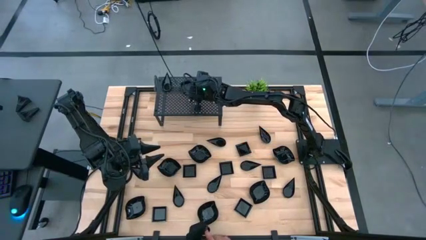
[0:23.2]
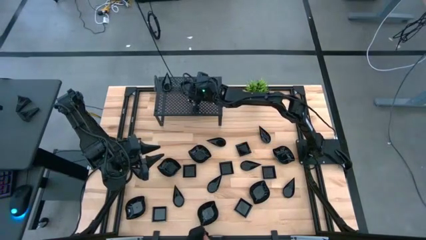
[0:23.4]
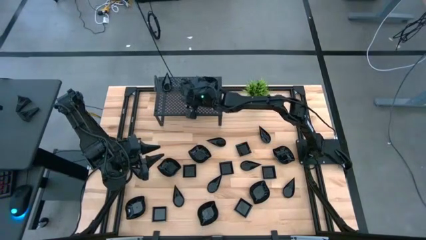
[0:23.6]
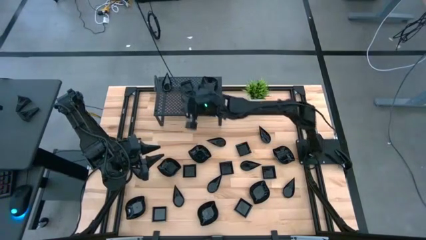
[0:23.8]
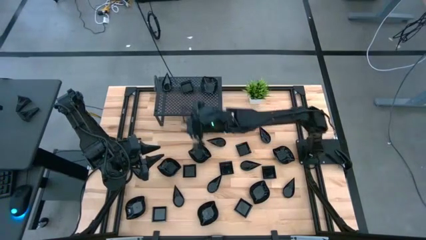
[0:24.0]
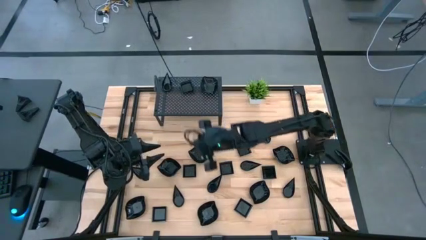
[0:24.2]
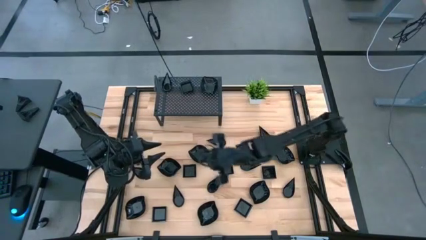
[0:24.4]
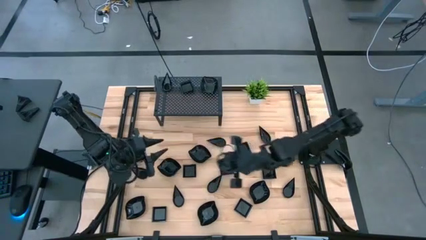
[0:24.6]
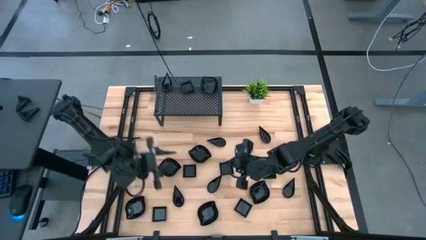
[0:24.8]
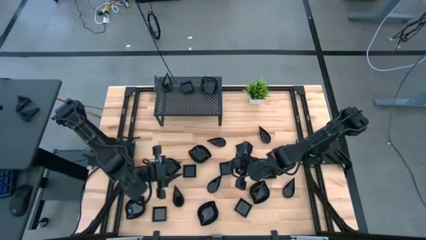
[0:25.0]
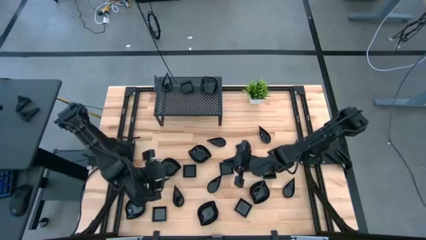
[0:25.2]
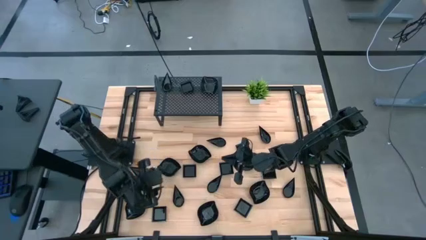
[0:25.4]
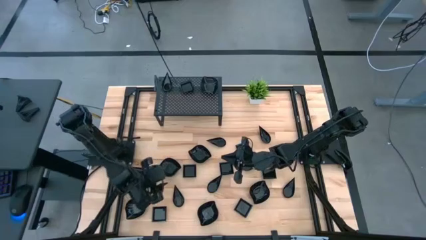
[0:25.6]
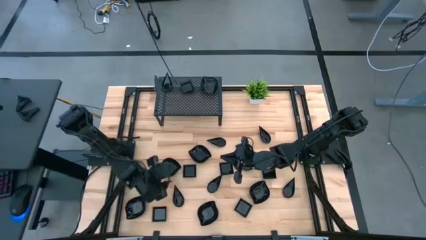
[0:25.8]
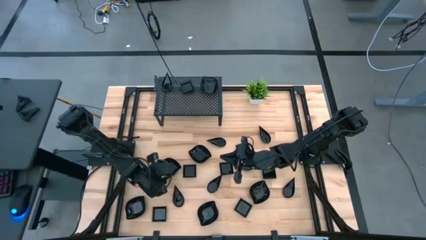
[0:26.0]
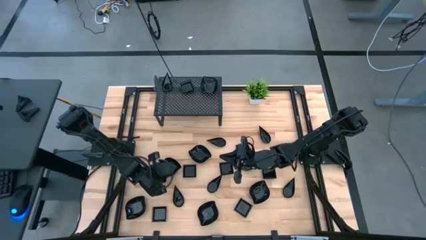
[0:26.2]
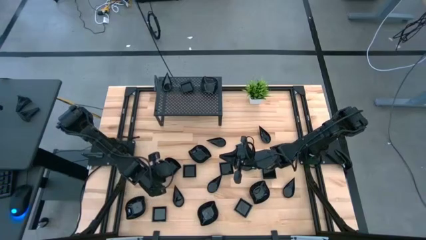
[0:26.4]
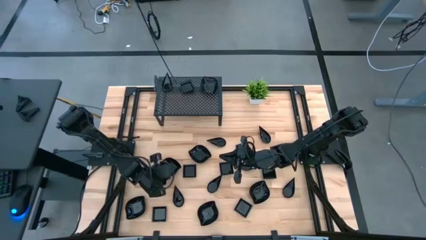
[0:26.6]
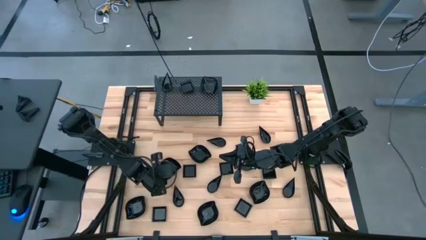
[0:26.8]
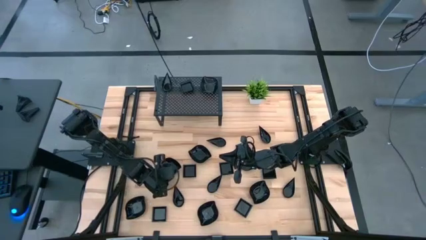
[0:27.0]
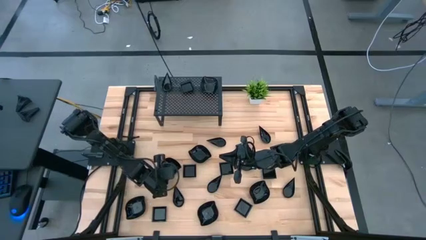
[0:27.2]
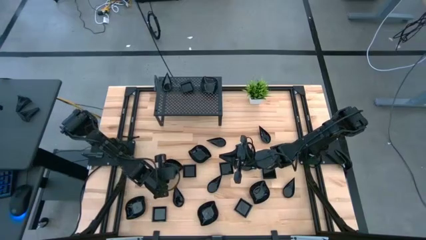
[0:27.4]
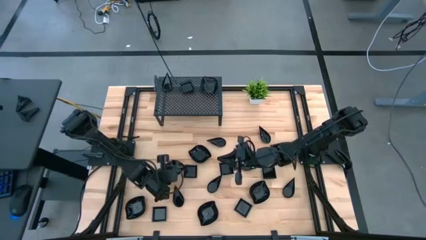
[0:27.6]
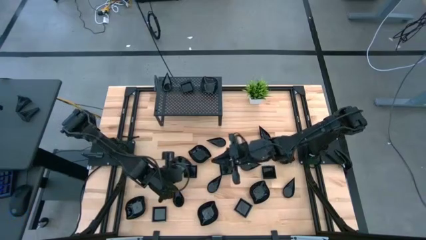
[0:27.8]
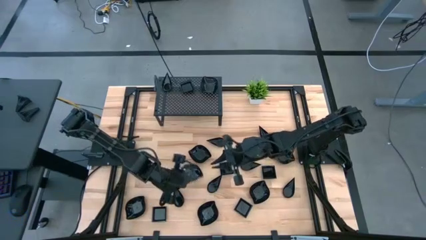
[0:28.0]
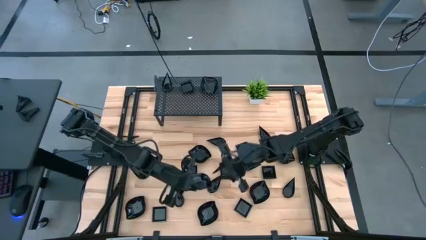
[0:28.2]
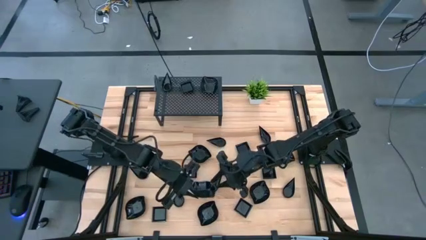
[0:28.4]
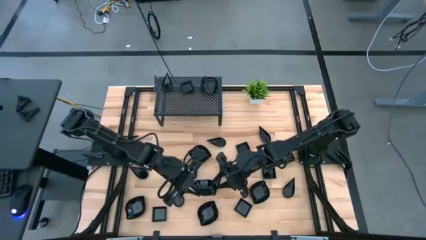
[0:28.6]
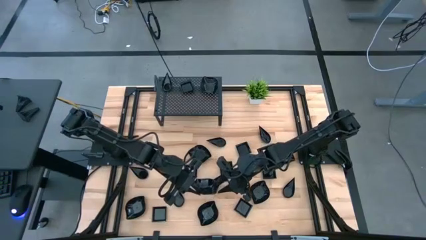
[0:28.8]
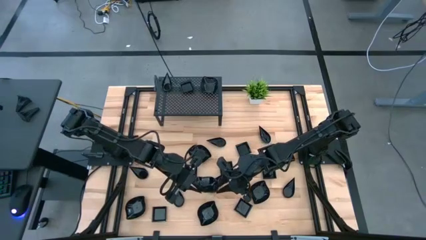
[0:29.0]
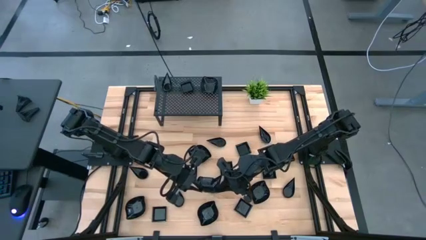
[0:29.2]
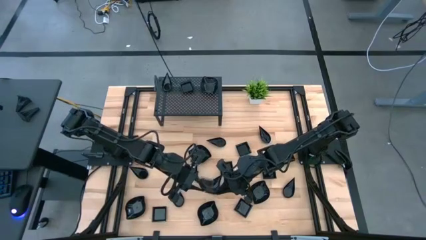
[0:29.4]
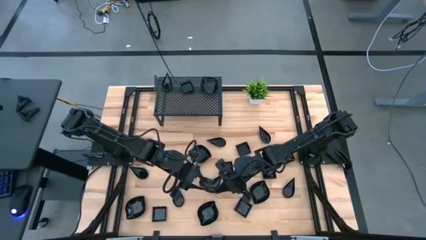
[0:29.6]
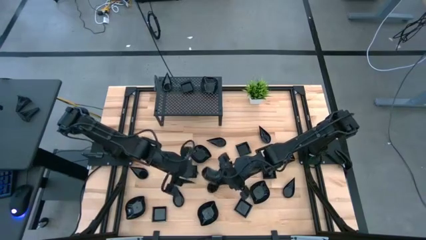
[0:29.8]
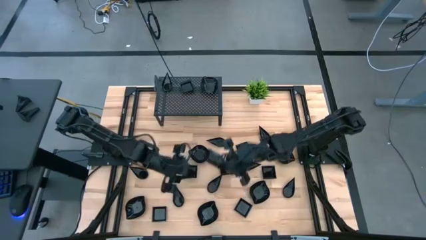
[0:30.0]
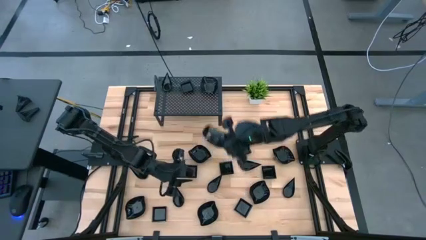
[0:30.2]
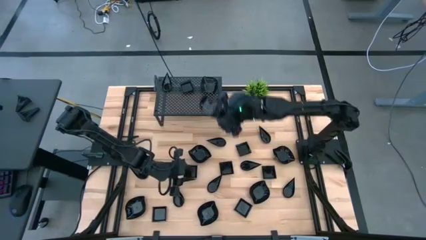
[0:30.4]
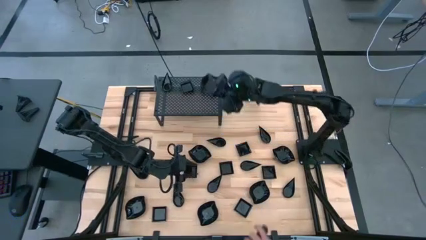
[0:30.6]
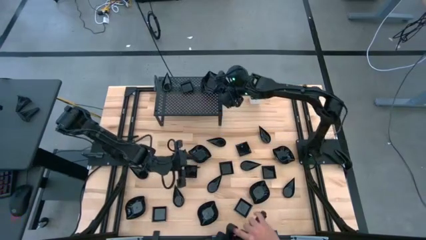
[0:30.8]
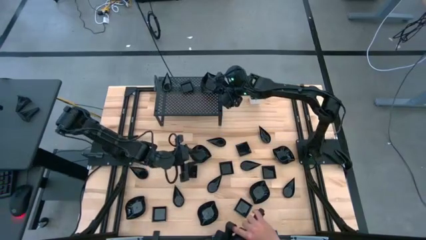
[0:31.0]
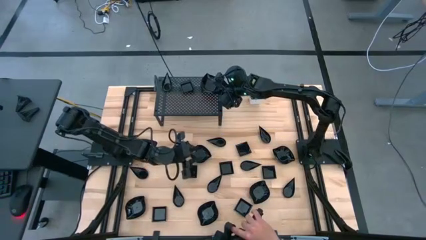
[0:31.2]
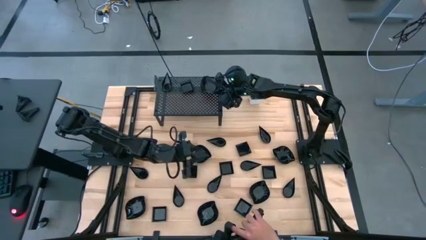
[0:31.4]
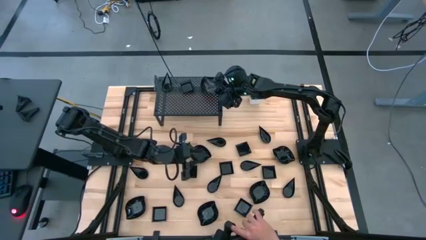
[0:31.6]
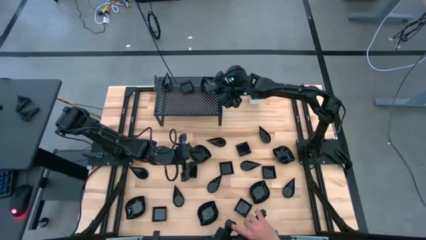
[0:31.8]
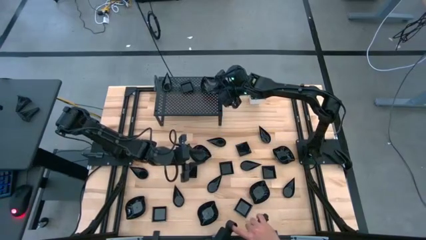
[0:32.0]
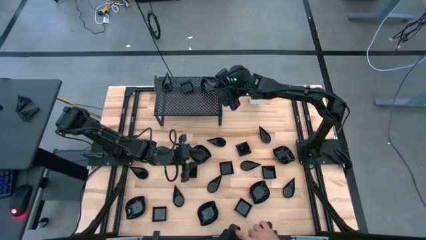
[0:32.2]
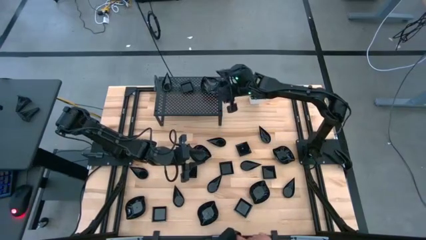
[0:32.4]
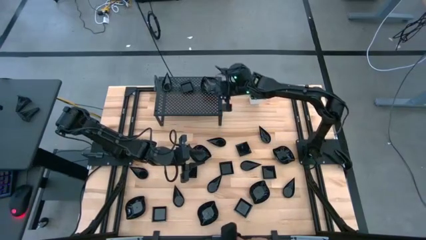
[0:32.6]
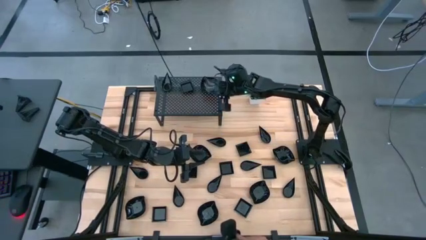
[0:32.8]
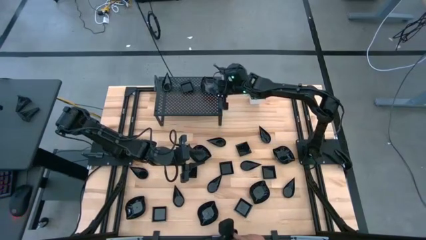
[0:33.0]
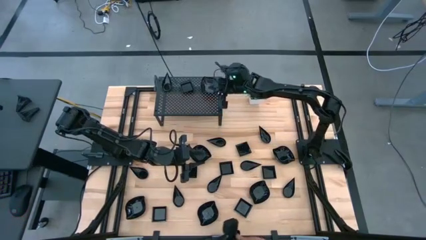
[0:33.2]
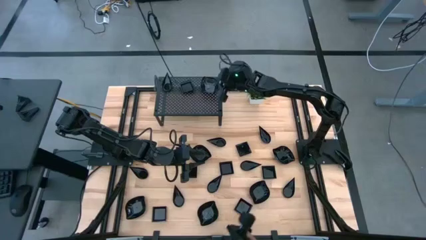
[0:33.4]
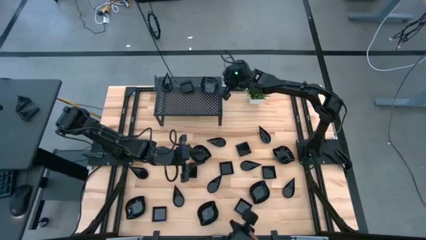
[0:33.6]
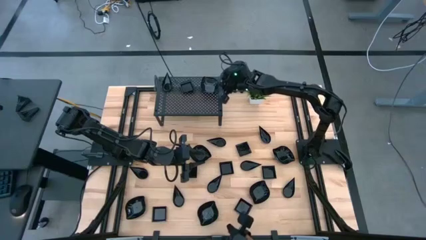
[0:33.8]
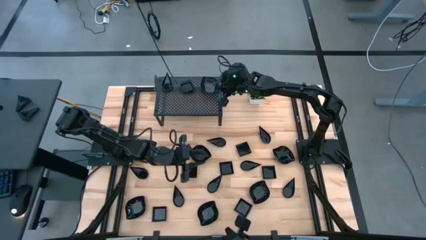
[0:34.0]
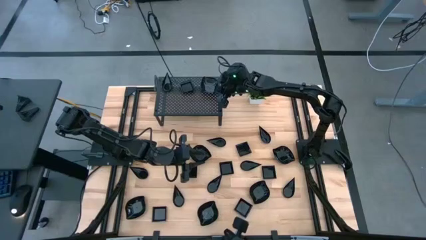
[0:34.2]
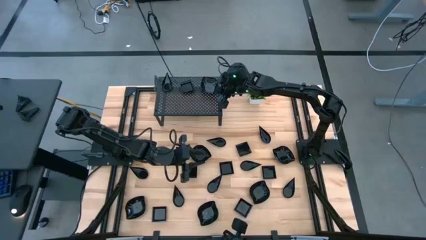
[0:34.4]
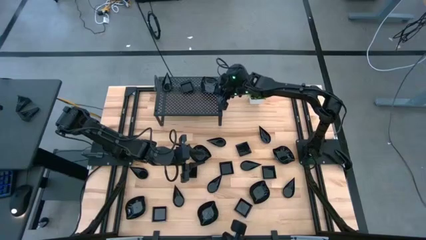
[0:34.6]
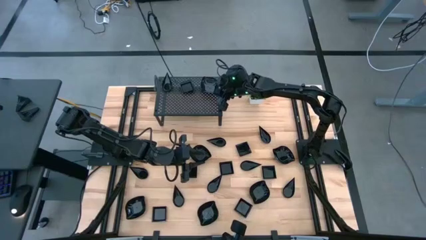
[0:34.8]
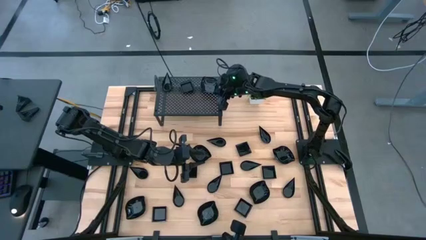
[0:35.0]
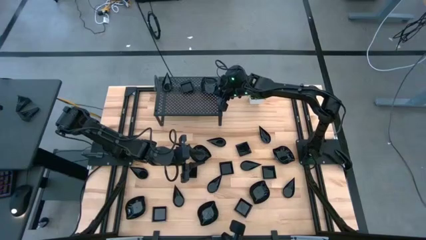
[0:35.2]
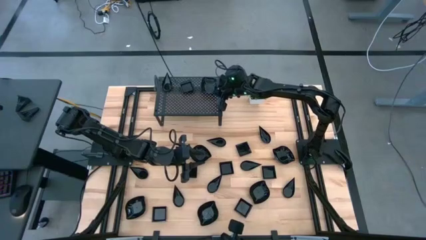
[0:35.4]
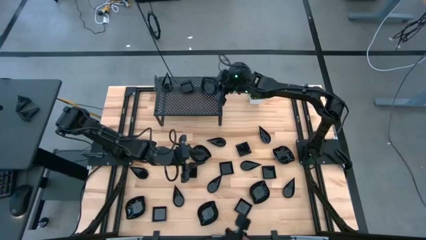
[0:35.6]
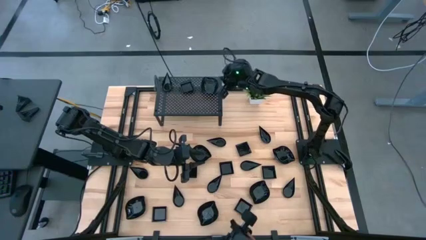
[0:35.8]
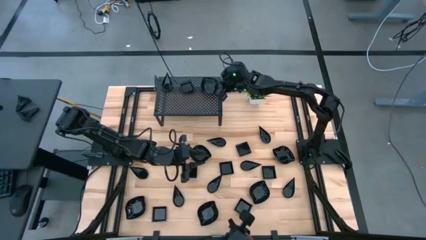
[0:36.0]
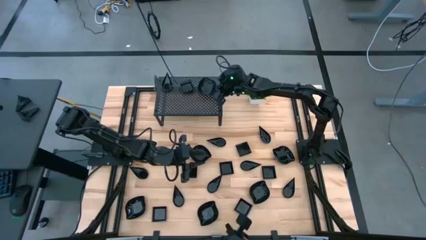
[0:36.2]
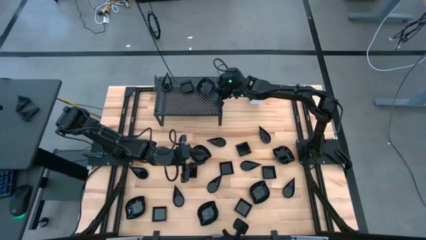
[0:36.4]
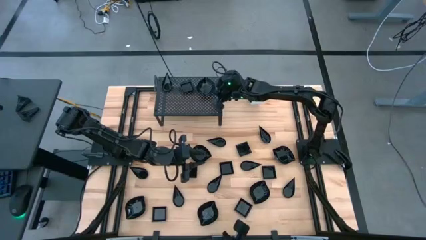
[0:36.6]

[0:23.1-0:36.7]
Task: Pick & Place Mini shaped plates
Stack the black leaf-shaped plate on top of the leaf-shaped plate on the shelf

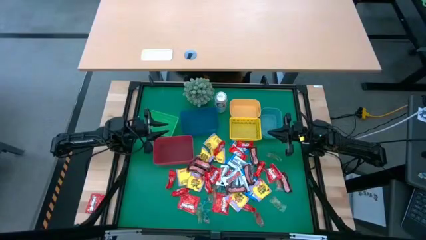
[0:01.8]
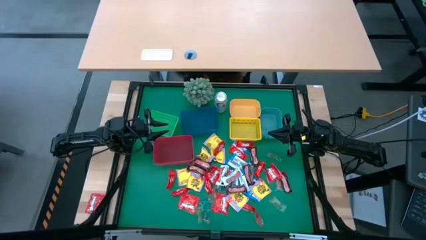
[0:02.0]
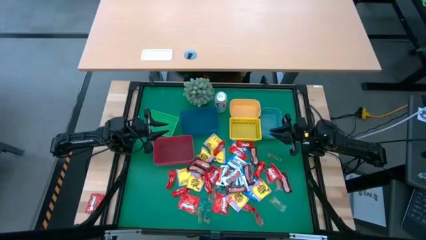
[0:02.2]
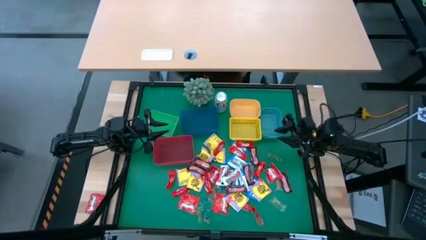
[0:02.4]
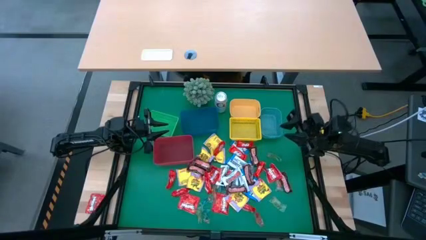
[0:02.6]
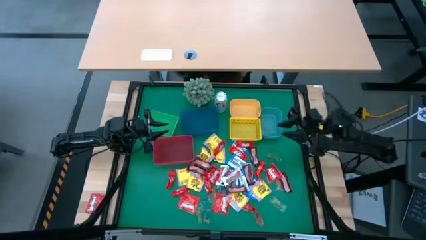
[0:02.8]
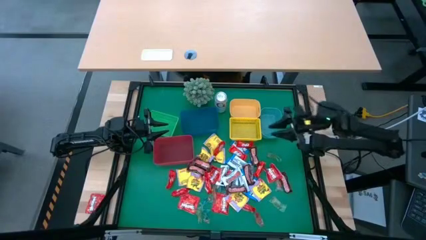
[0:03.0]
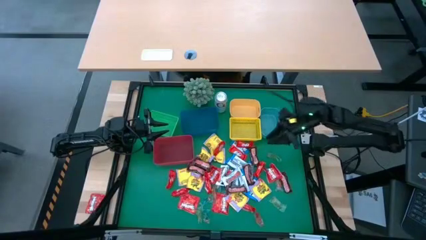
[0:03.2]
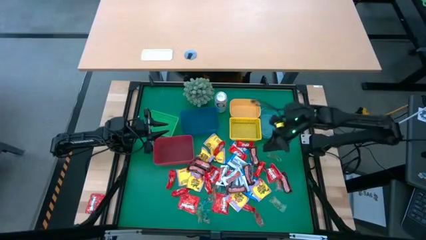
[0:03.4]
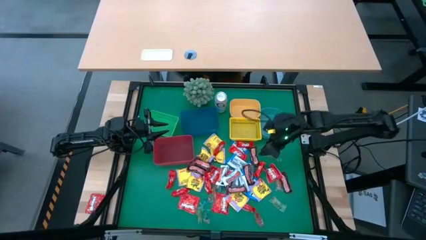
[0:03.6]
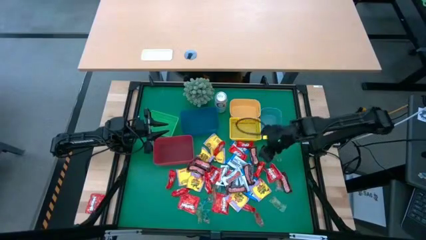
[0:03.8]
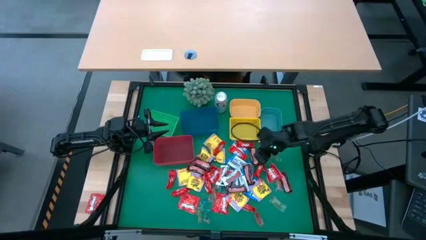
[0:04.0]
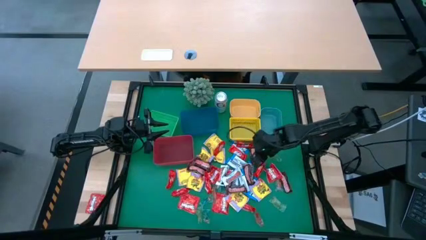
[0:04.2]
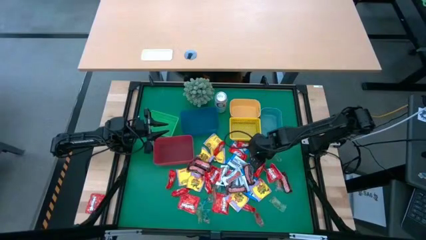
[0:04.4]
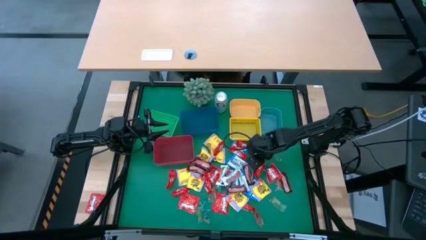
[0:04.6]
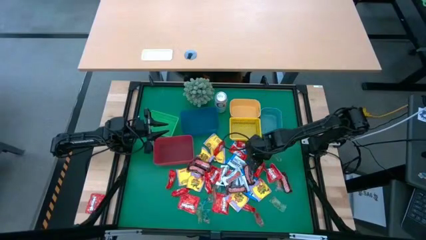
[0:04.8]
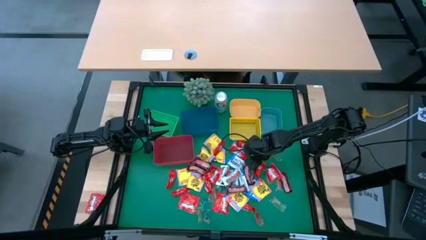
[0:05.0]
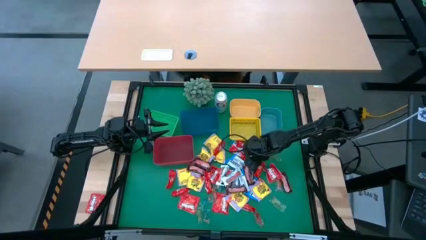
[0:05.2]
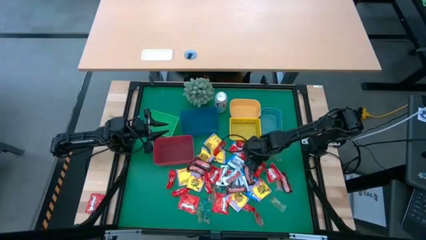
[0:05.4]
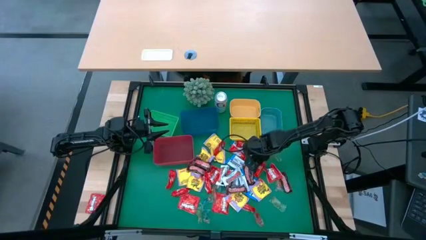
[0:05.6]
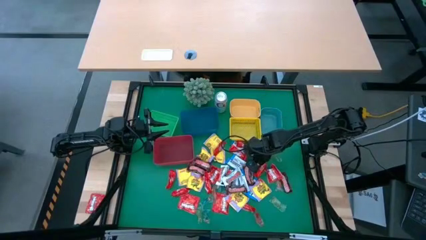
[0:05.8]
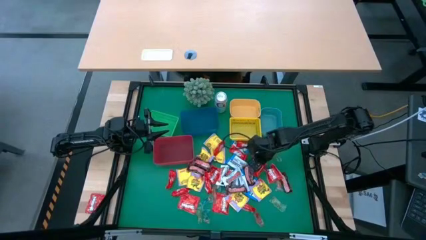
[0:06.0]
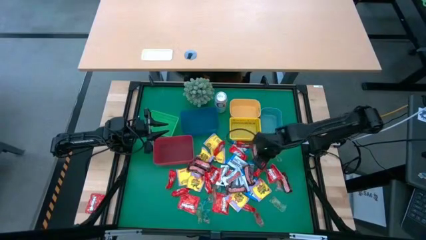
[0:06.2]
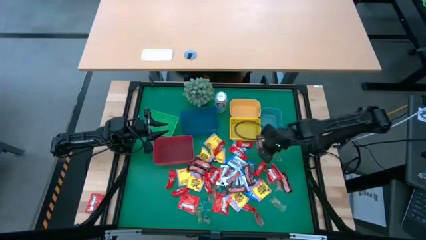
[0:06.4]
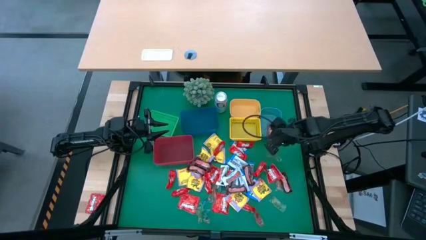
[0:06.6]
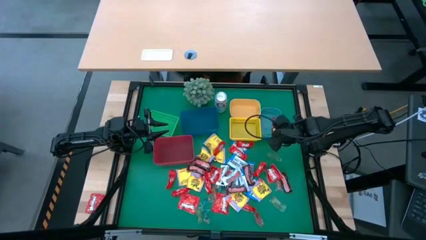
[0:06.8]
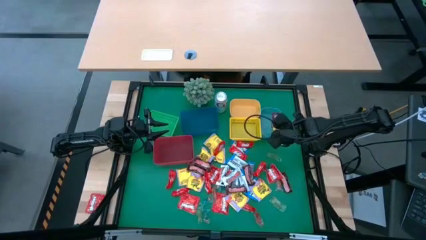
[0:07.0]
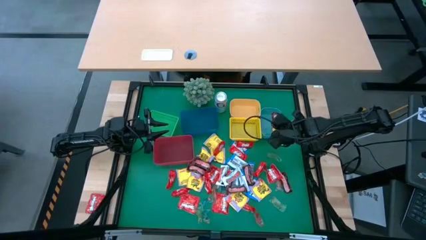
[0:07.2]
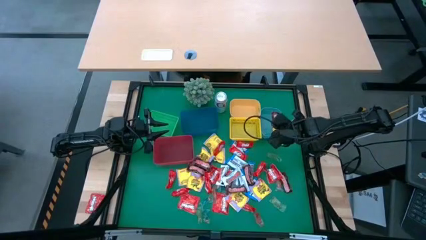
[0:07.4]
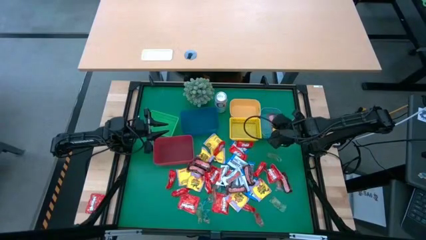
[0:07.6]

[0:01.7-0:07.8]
Task: Sort candy
Put the brown candy bar into the green bin
